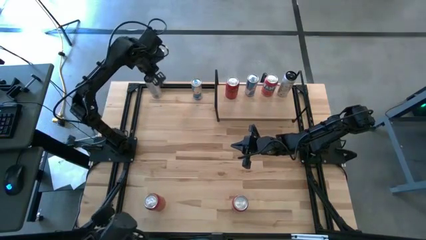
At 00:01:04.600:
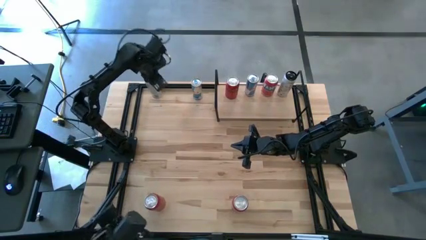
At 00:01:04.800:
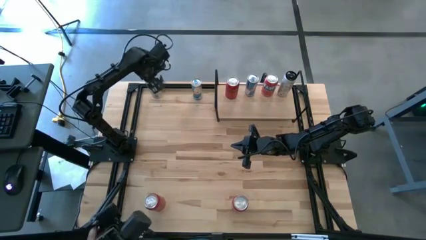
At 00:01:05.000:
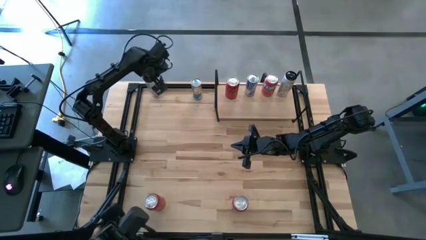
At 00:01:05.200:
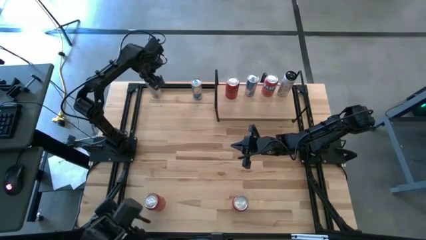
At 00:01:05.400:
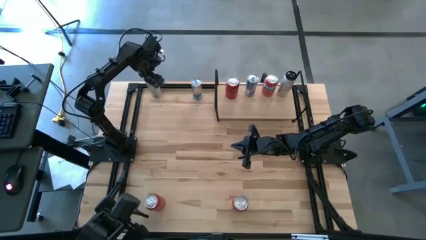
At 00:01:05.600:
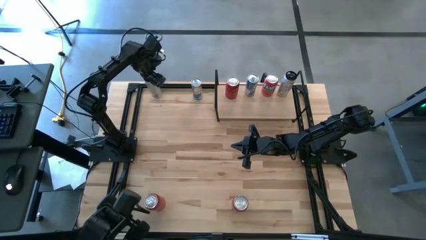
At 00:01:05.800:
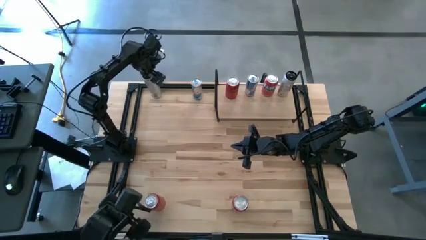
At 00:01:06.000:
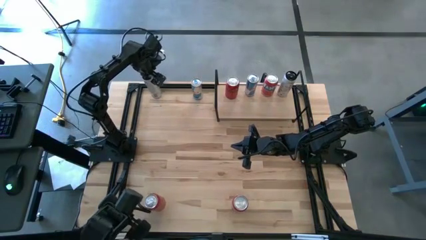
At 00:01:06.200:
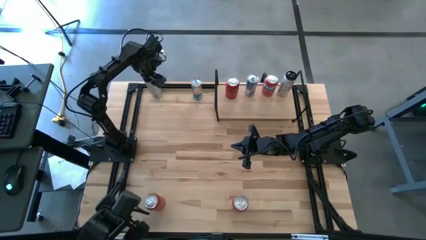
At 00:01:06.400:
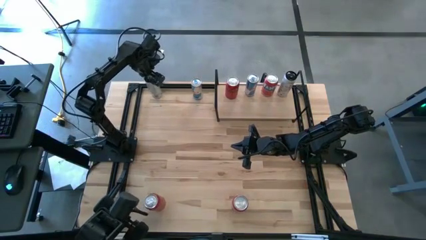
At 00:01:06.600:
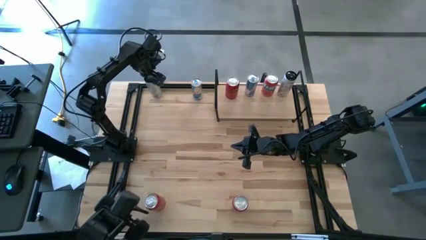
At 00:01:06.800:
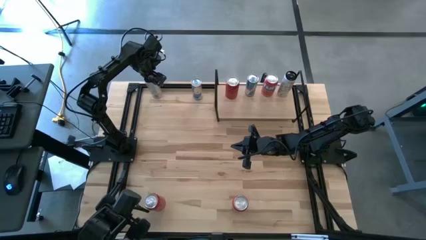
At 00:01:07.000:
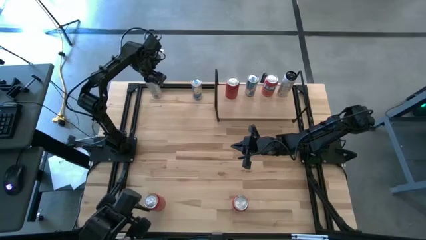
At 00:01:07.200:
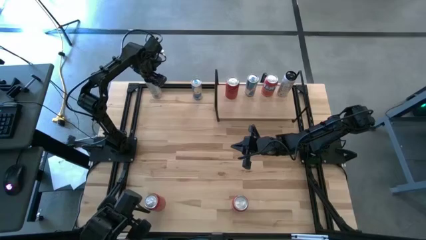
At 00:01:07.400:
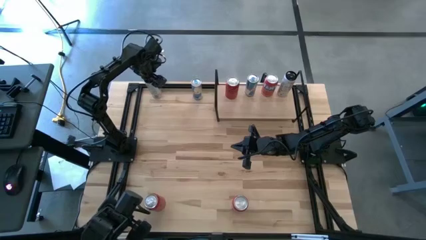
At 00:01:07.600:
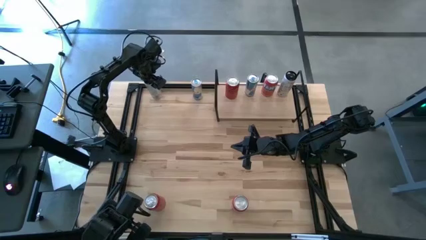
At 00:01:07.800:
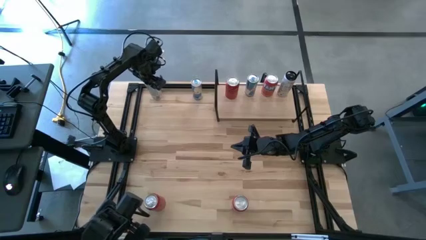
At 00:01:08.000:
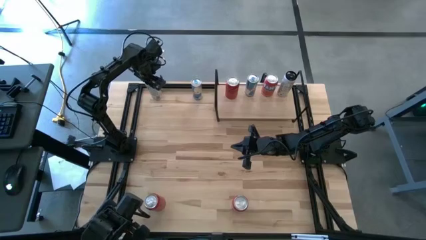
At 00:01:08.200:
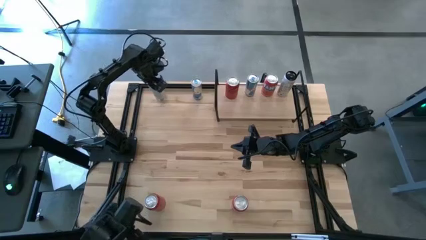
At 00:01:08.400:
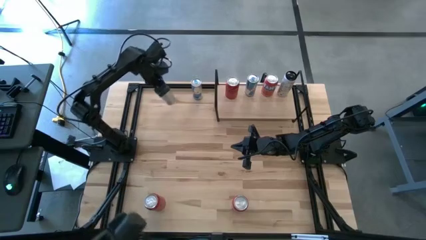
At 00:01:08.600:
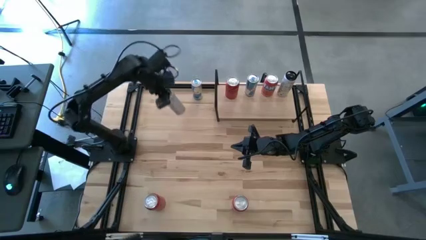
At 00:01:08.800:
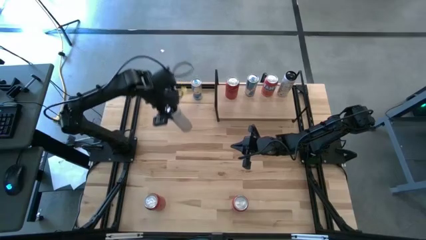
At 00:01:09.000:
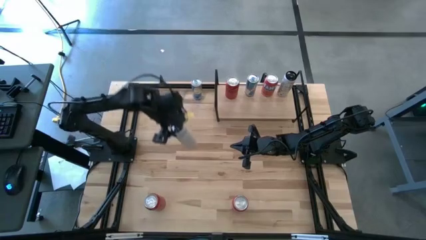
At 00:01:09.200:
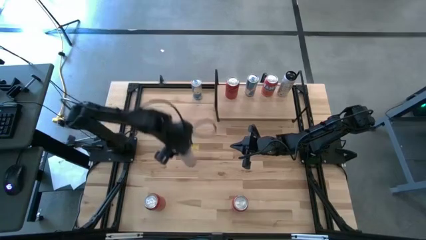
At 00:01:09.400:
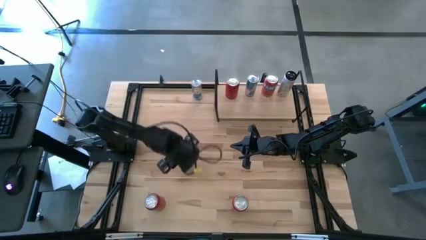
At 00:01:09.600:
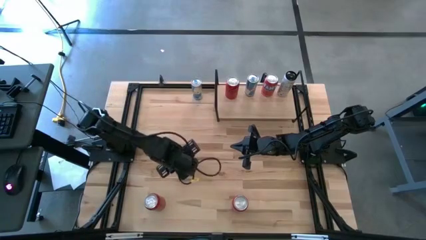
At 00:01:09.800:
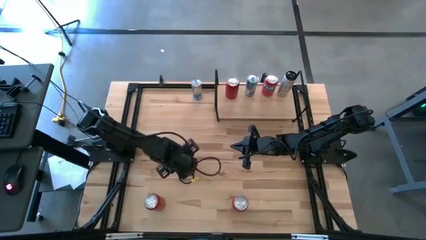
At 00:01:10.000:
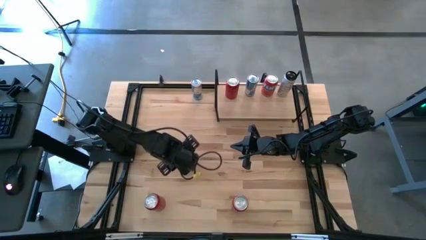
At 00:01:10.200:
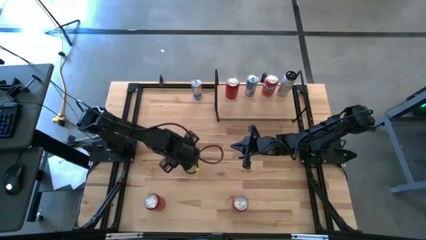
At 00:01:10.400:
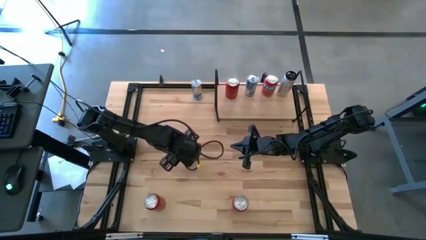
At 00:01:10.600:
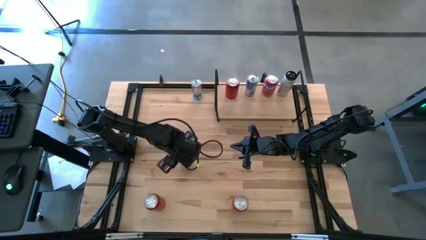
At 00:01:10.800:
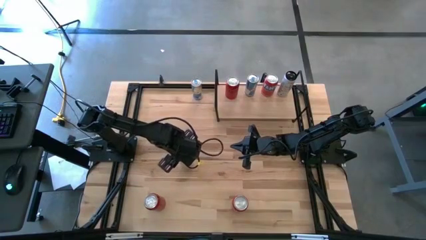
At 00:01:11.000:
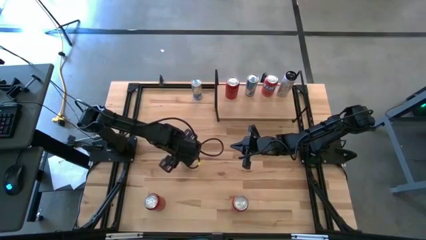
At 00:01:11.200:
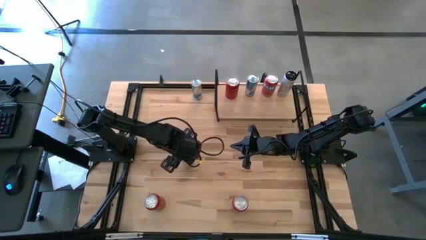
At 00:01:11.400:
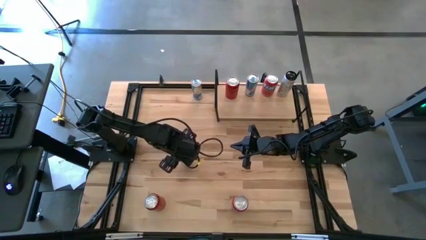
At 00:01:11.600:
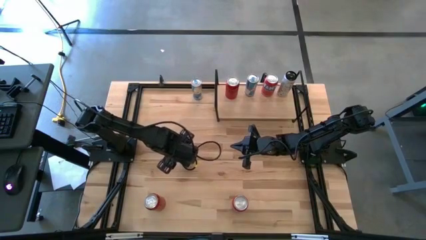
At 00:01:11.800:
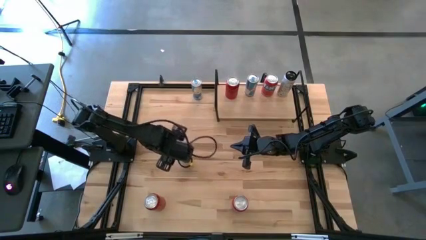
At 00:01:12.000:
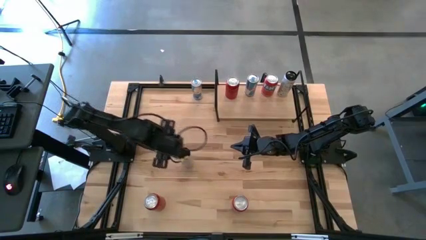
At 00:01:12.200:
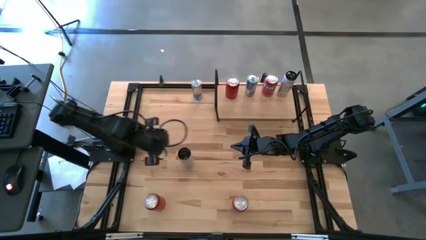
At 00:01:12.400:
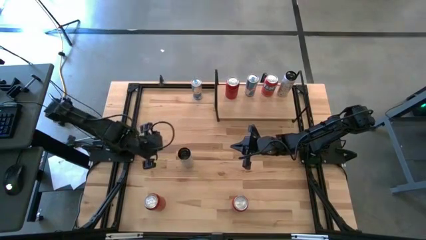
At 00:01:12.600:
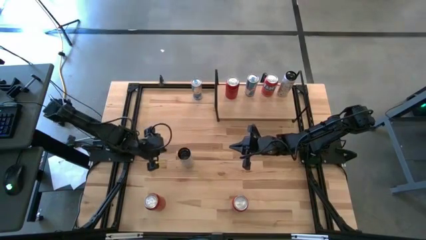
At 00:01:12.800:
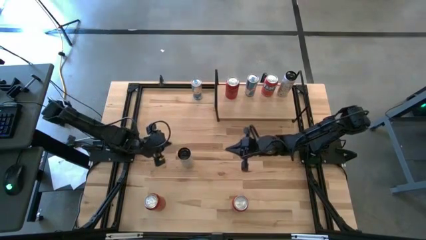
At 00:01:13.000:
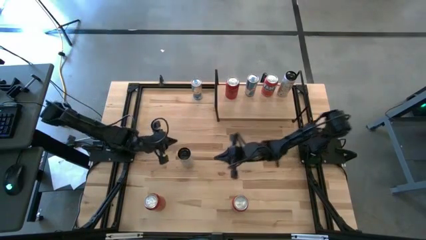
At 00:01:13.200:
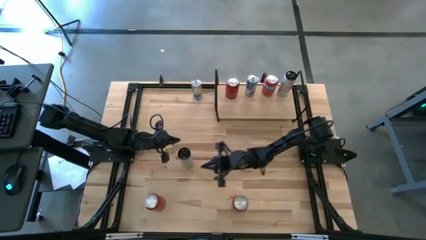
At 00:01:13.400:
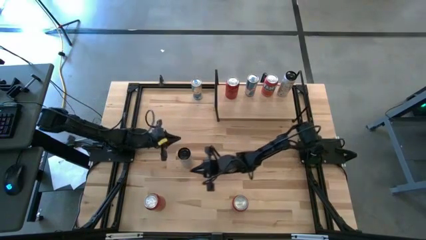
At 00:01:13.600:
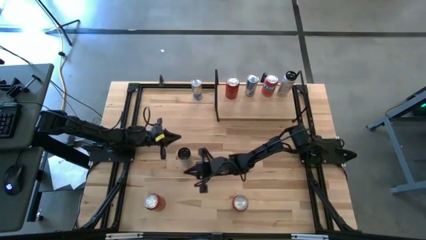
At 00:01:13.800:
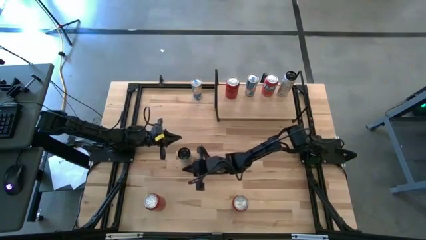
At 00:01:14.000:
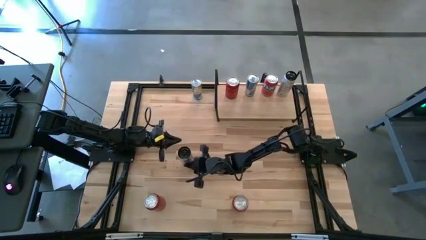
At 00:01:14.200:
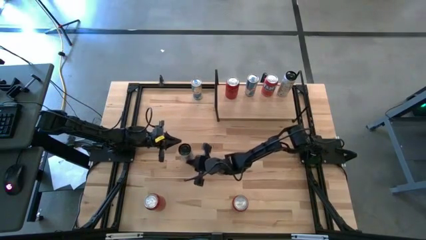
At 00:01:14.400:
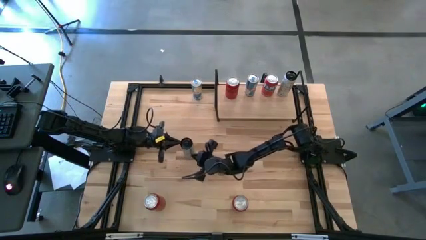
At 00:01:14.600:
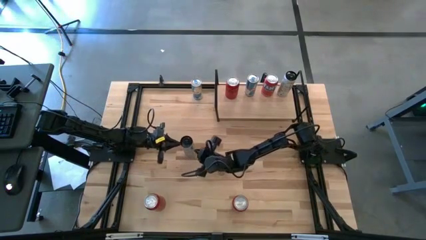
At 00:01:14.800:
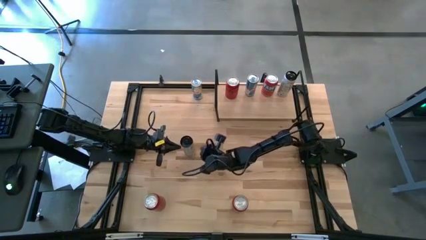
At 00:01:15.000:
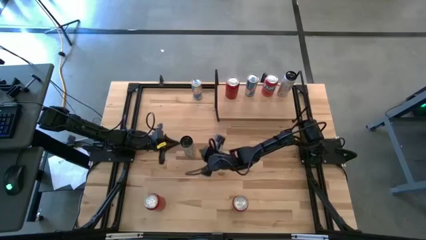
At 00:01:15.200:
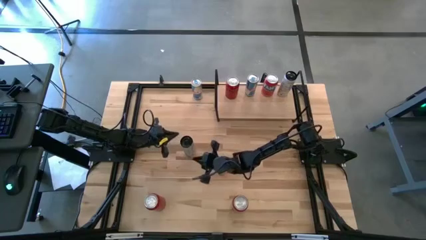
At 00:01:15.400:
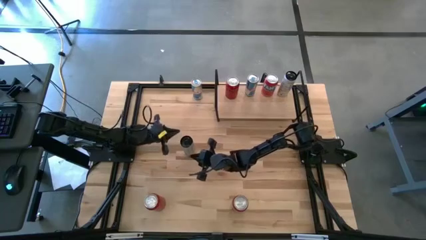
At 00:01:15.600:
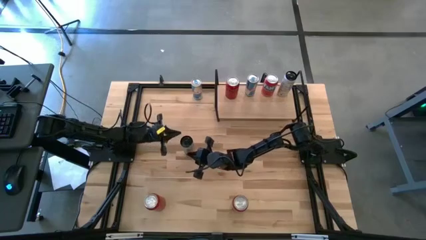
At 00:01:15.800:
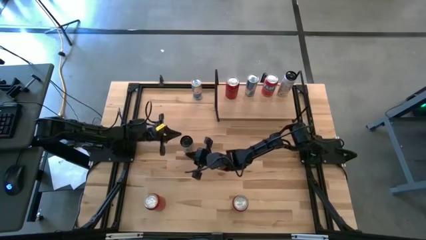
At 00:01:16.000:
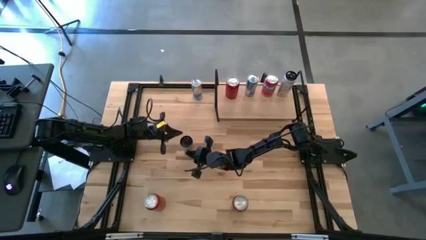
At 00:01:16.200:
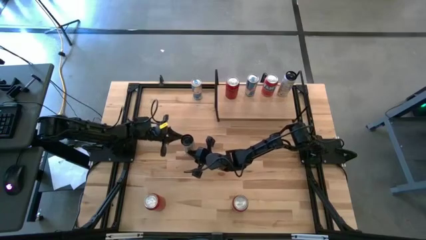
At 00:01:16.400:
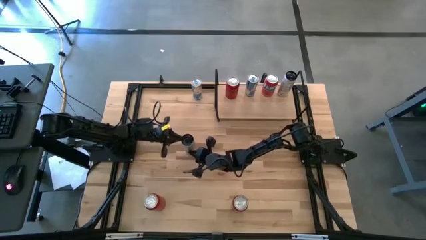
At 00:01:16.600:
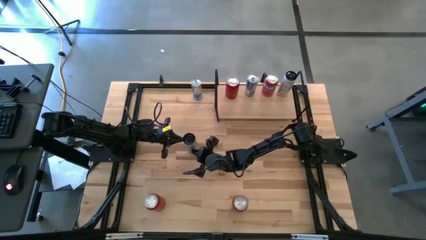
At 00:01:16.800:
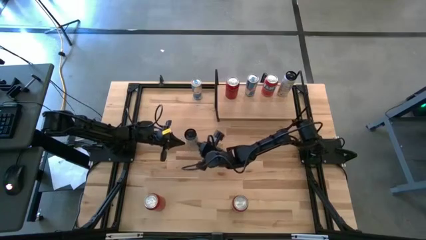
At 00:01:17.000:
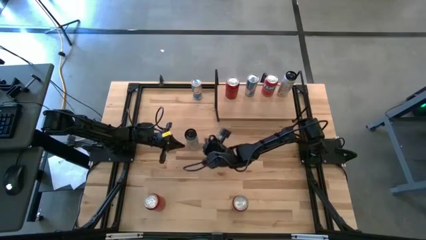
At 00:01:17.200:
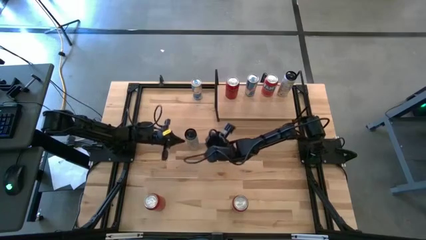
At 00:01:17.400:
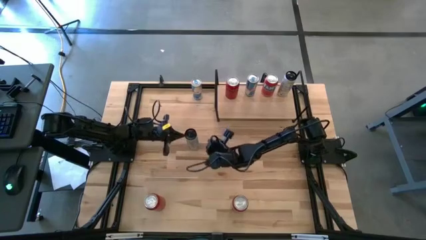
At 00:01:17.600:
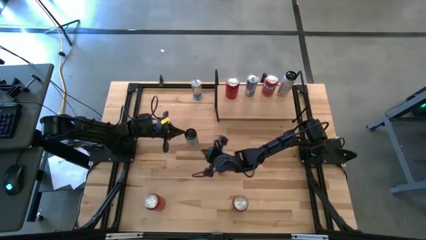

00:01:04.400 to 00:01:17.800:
Task: Place canned beverage on shelf
Put the white-yellow soda can on the shelf aligned with the other white-yellow soda can
